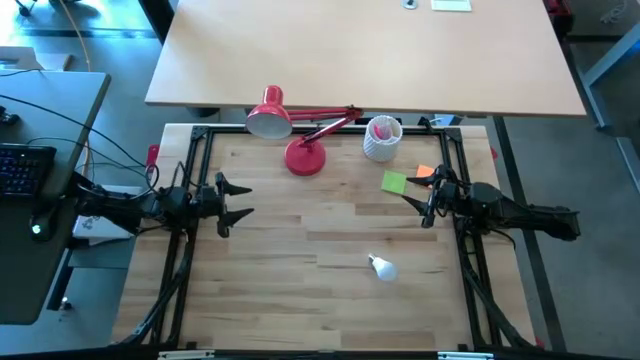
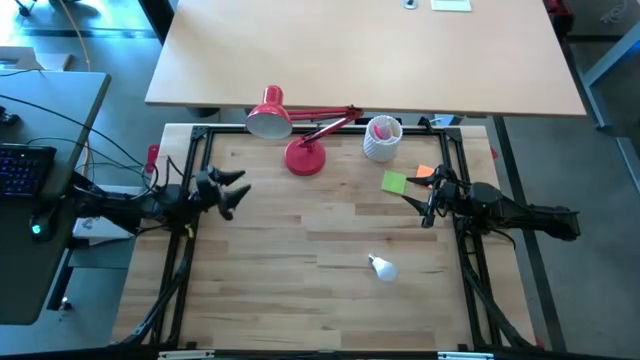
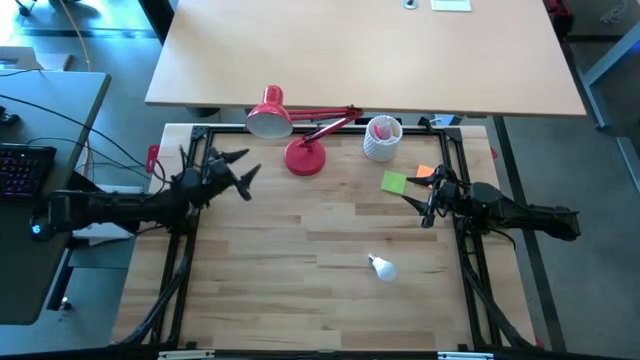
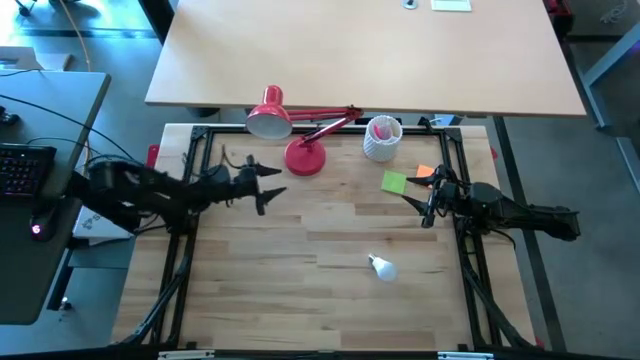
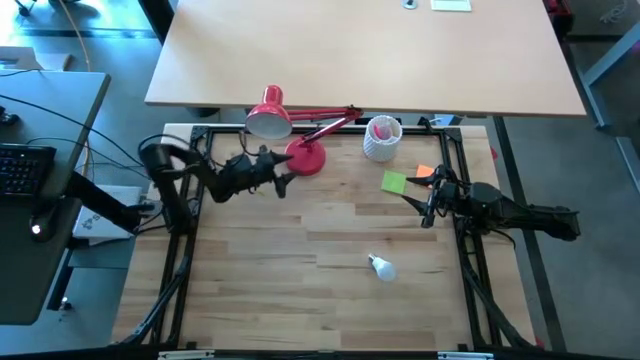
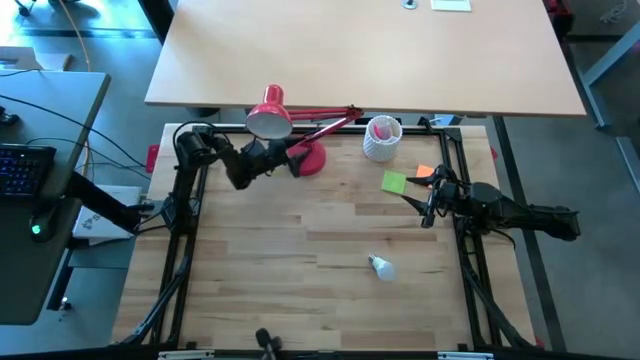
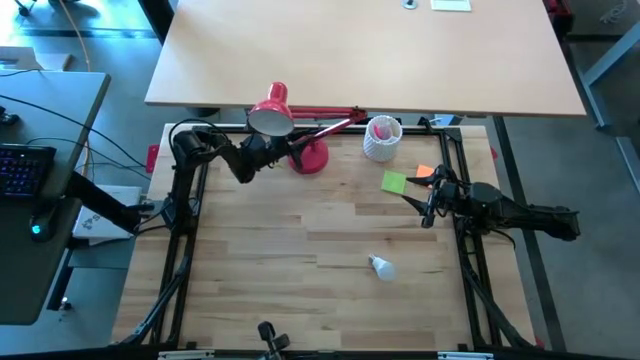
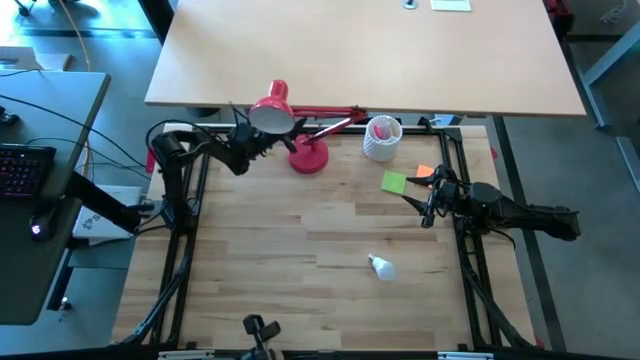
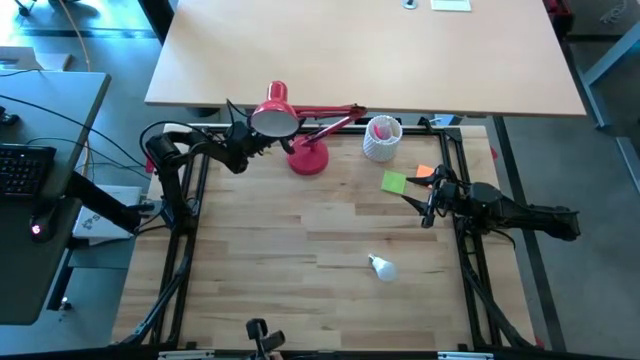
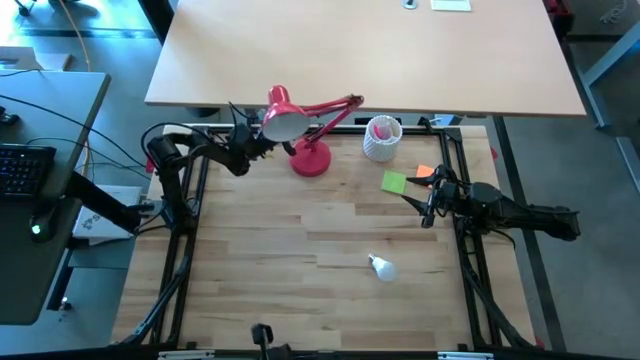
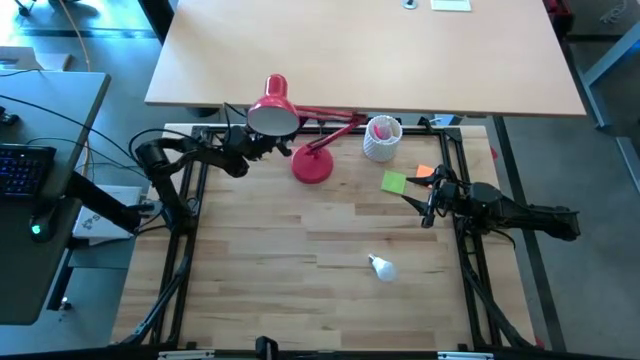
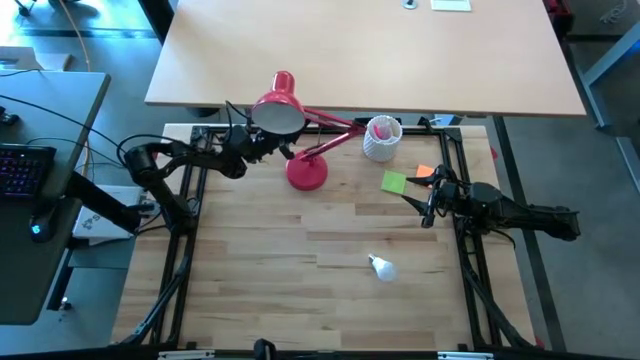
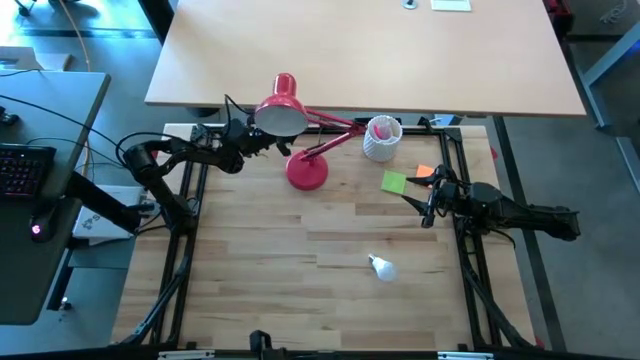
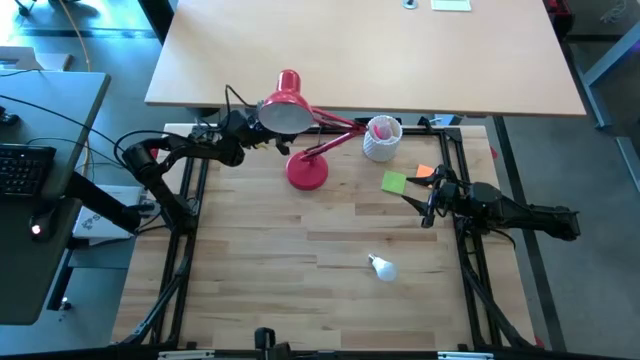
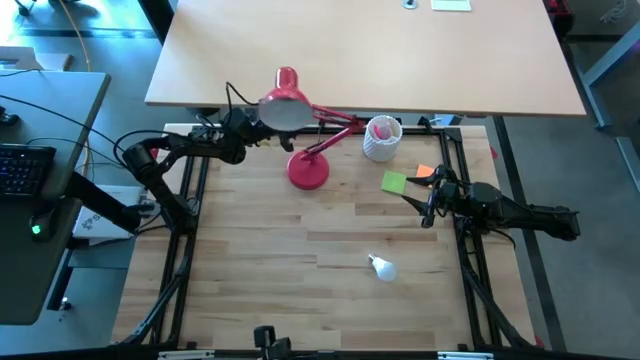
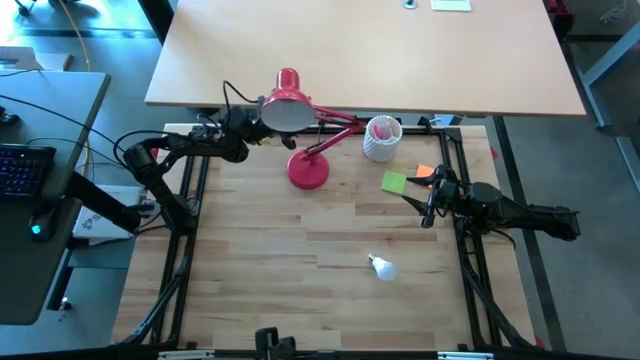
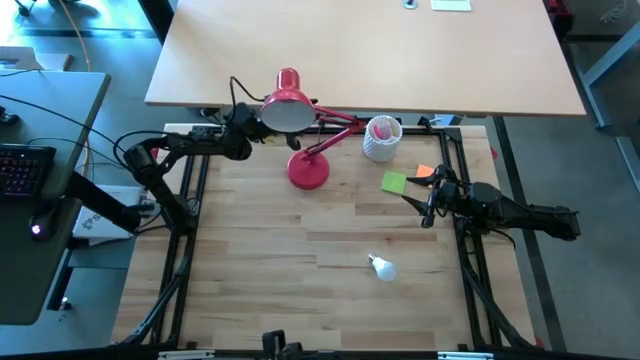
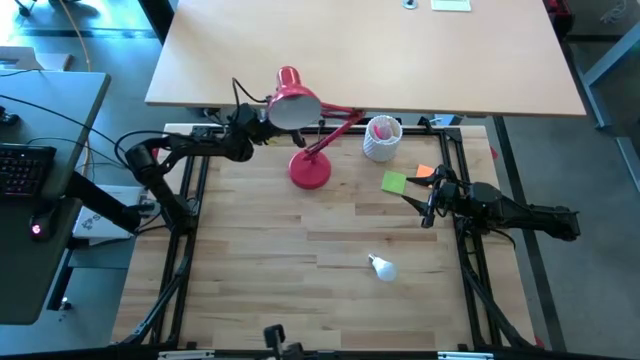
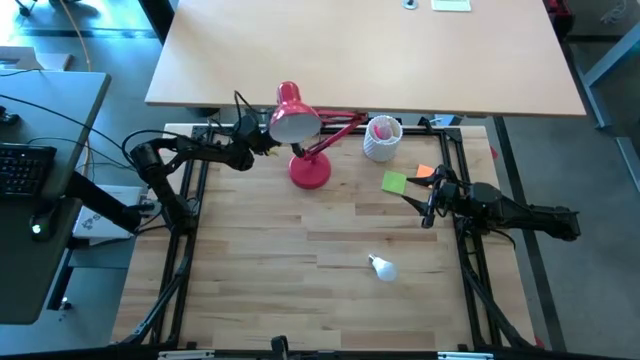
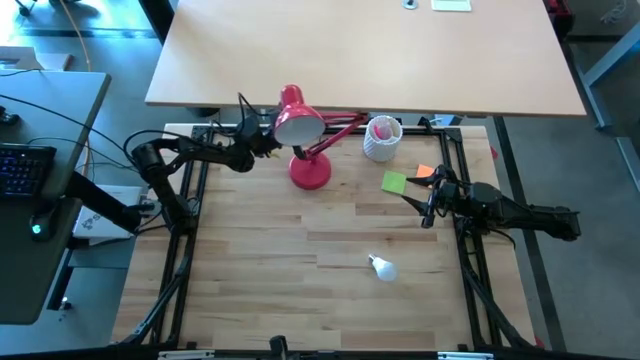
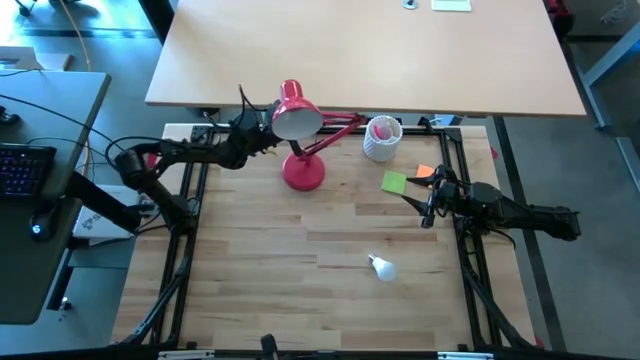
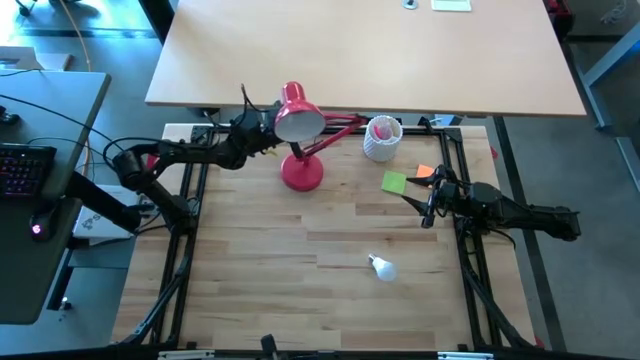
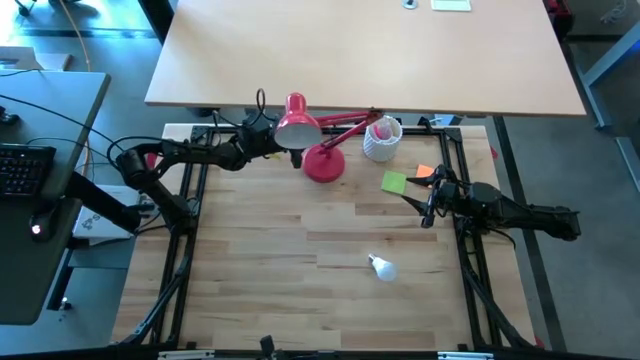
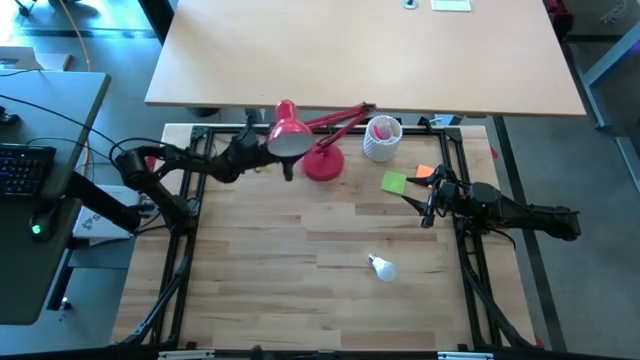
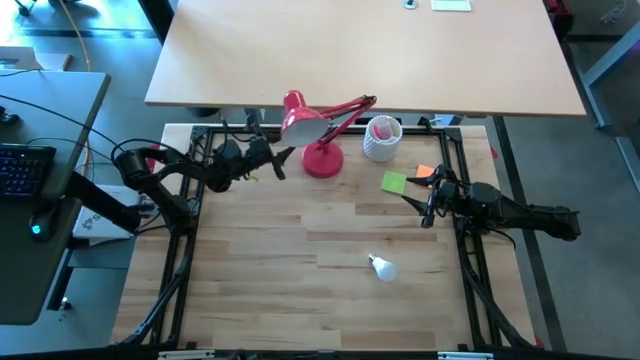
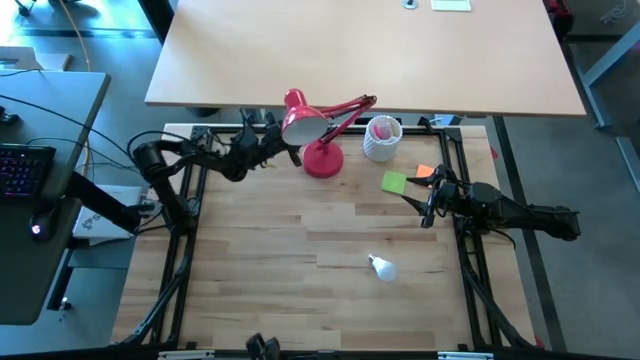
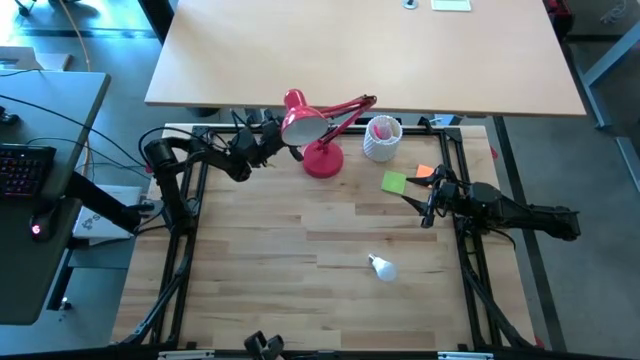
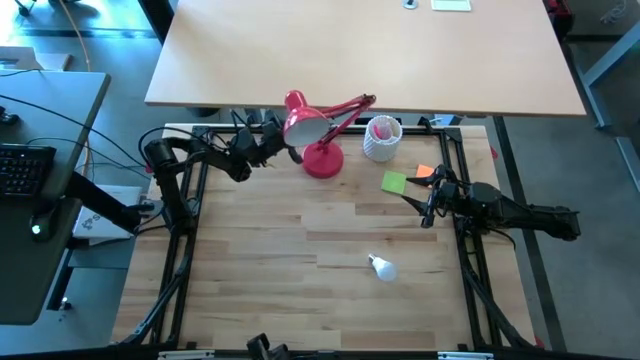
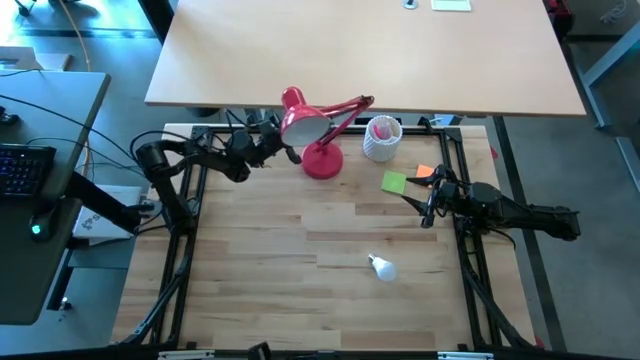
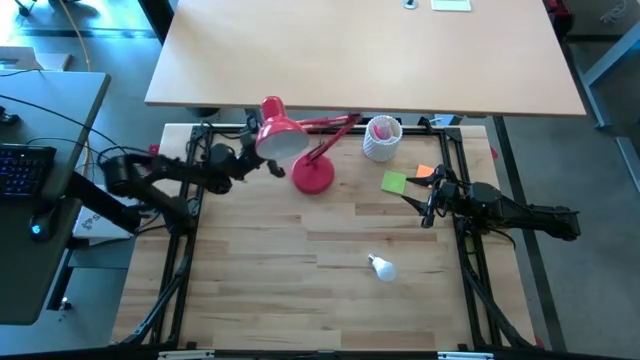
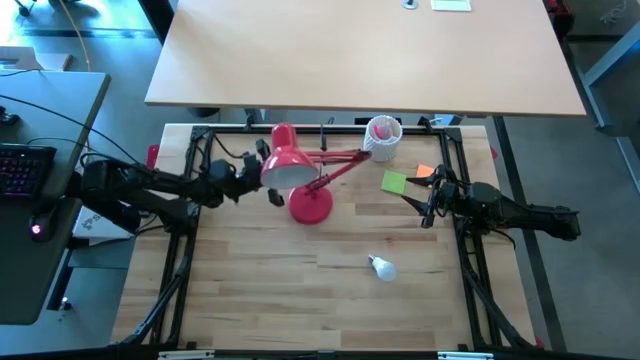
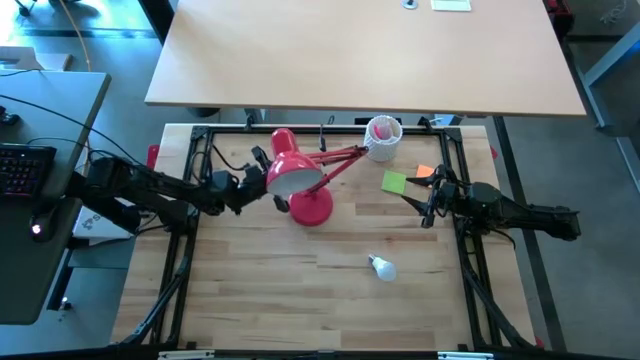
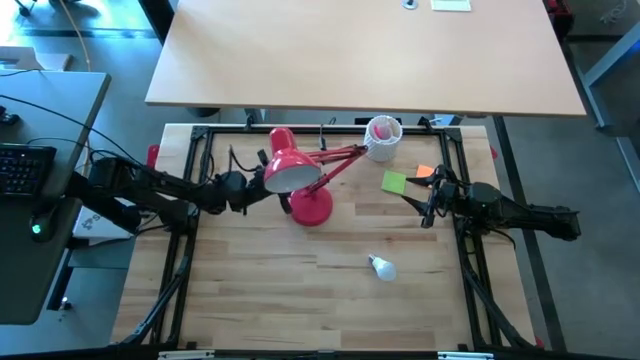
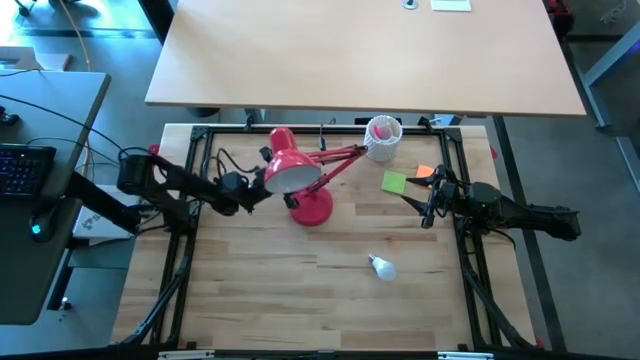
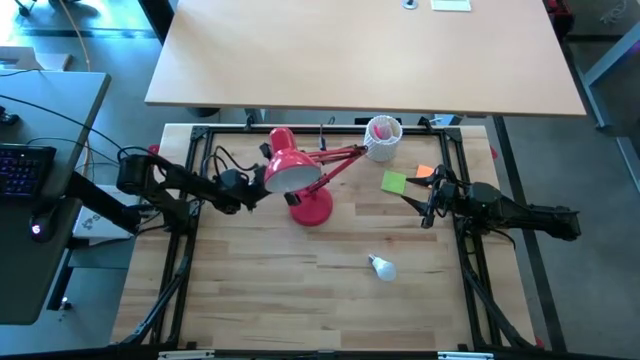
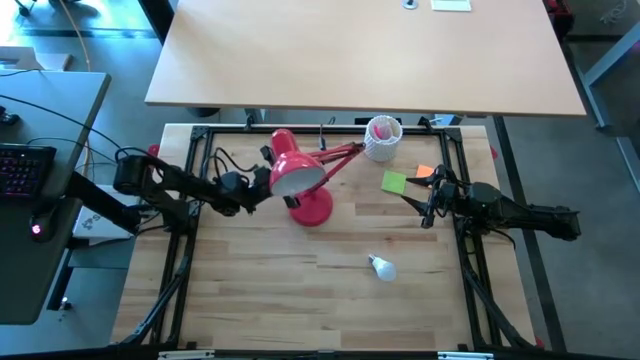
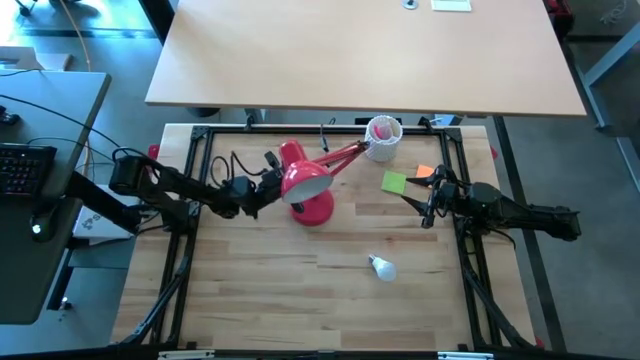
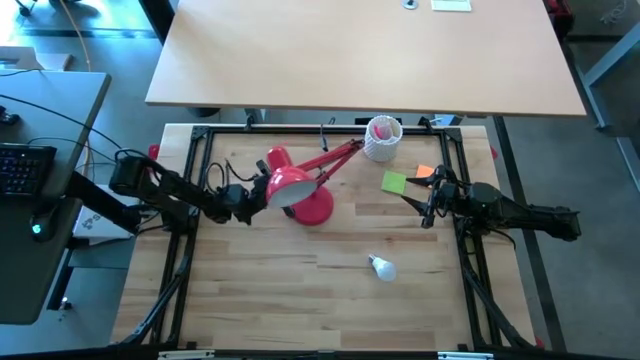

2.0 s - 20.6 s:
Task: Screw lightbulb
Adjust the red lamp
